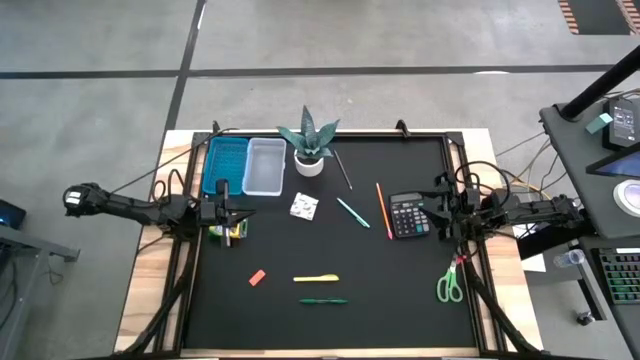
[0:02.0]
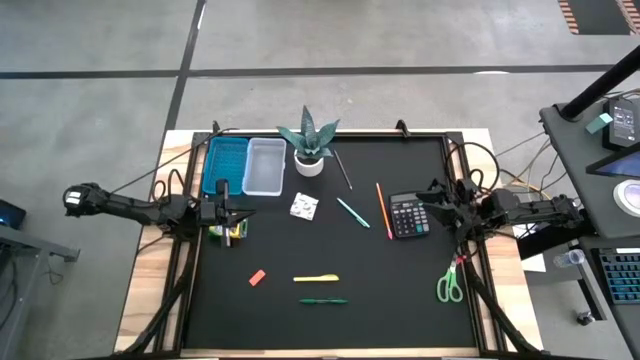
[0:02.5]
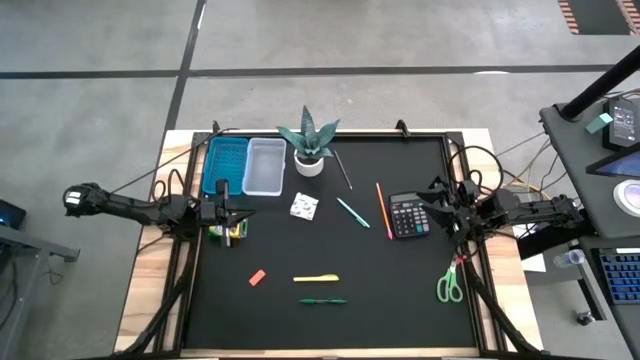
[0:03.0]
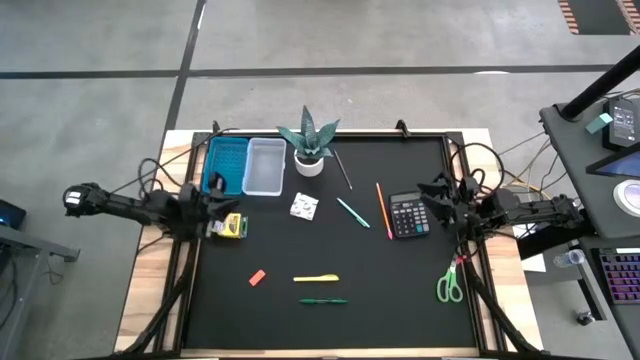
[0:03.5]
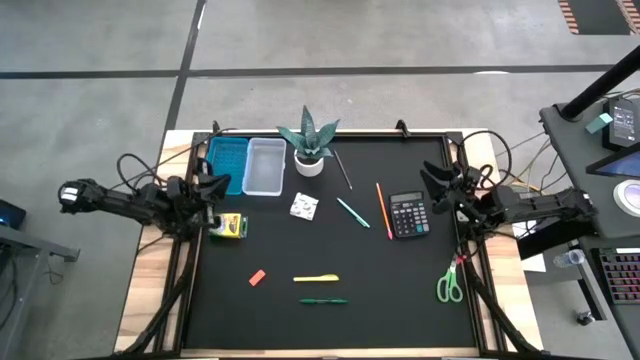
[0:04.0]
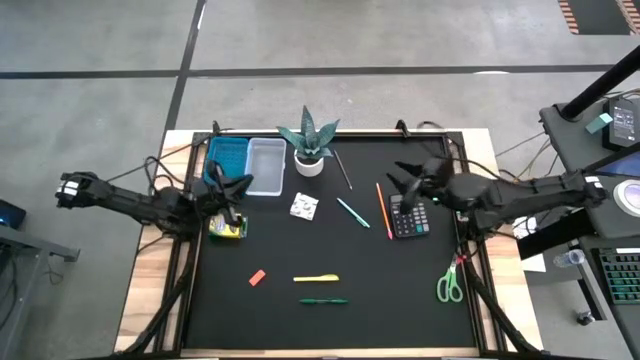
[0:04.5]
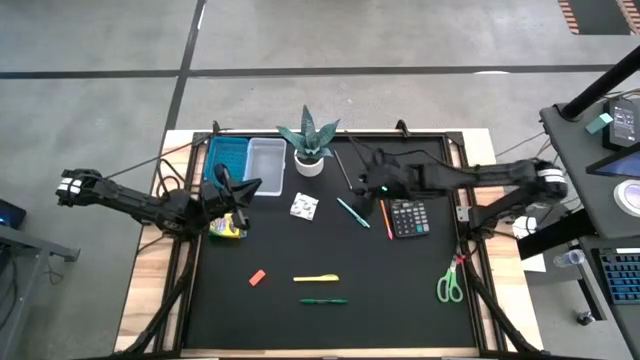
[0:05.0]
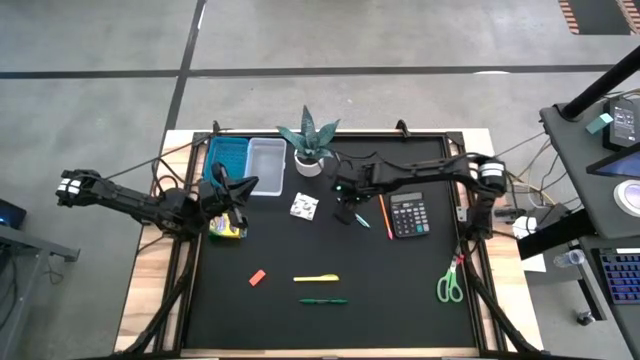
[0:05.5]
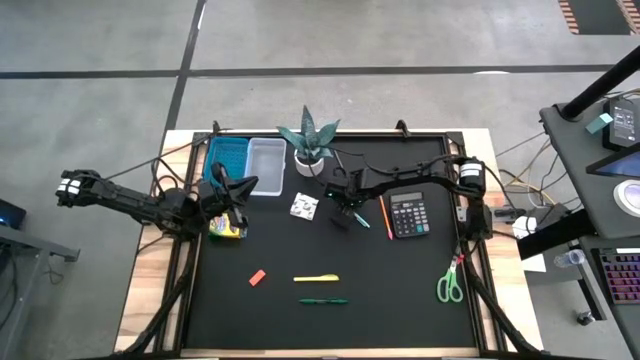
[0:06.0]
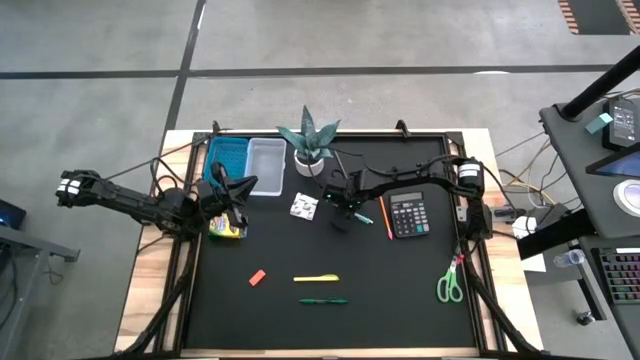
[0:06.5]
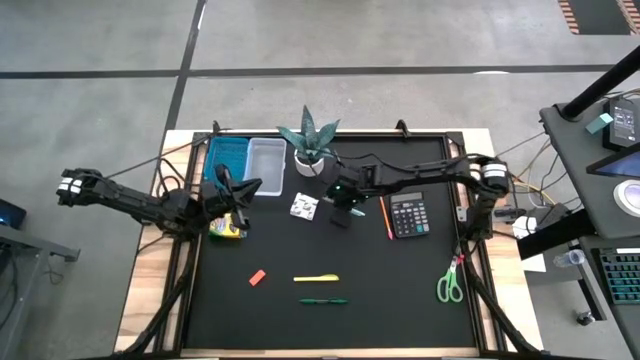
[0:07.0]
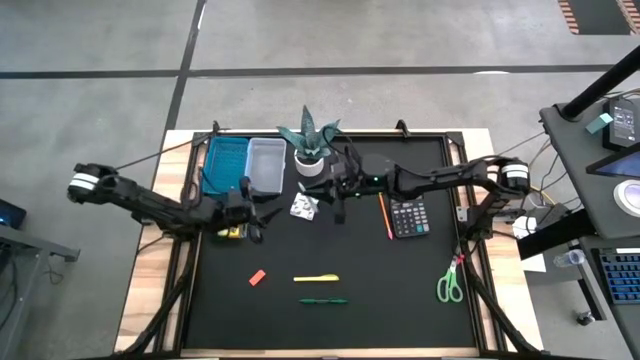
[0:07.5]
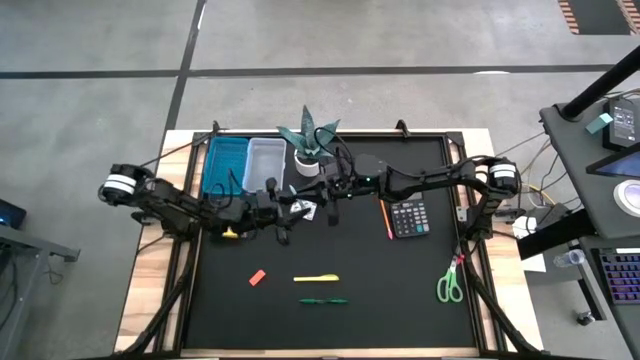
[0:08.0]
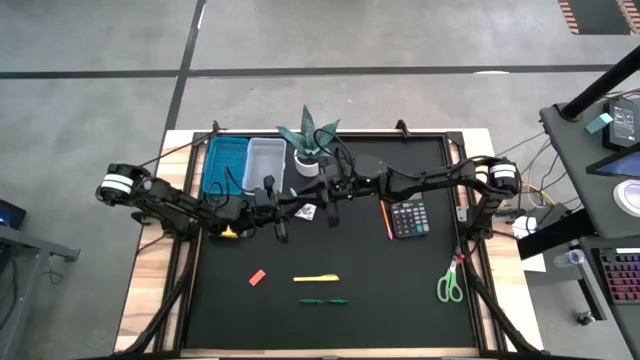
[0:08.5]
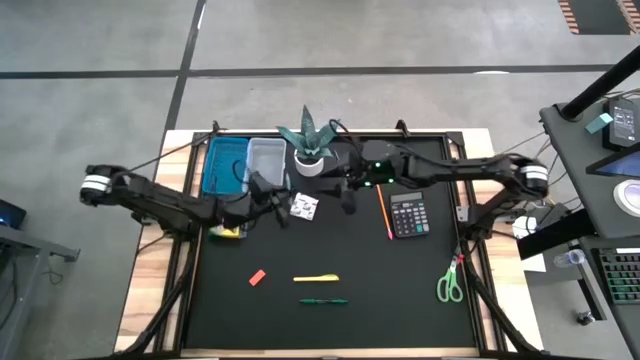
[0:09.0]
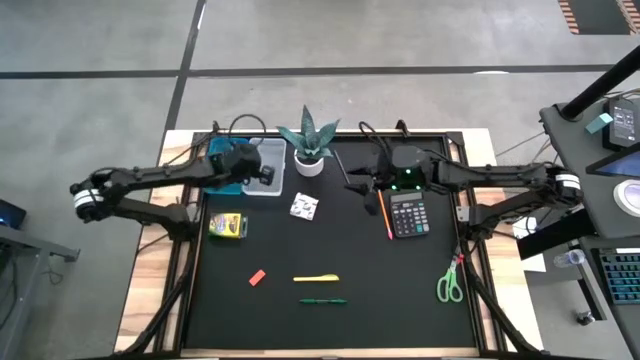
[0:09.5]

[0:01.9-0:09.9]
Task: Pack school essentials
Put the light blue pen into the blue supply box

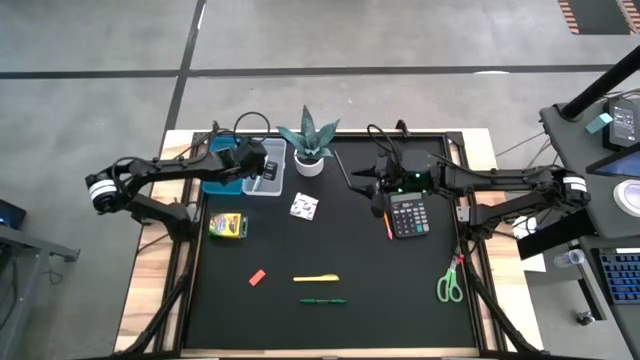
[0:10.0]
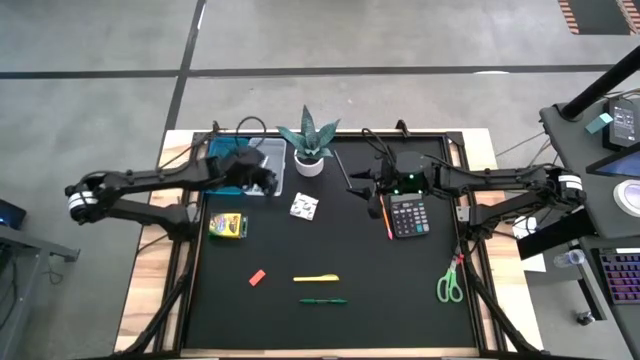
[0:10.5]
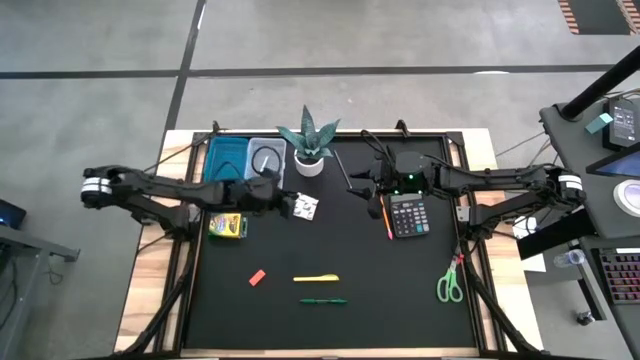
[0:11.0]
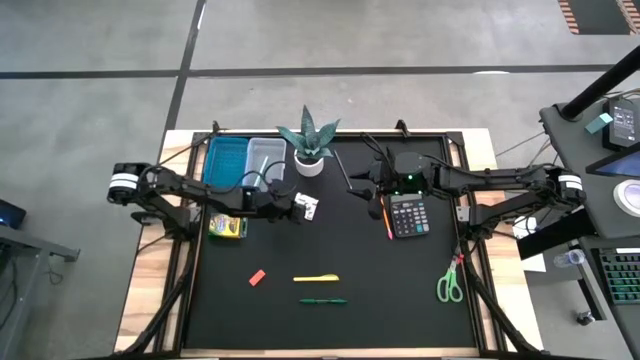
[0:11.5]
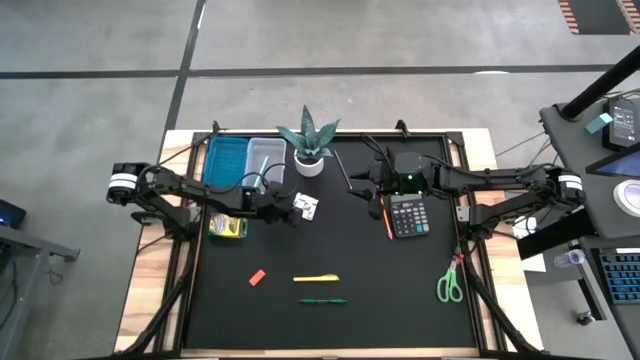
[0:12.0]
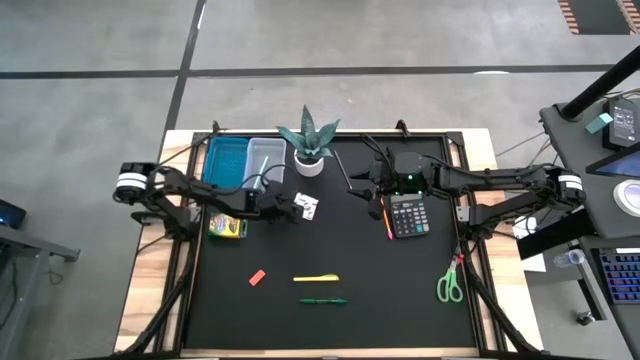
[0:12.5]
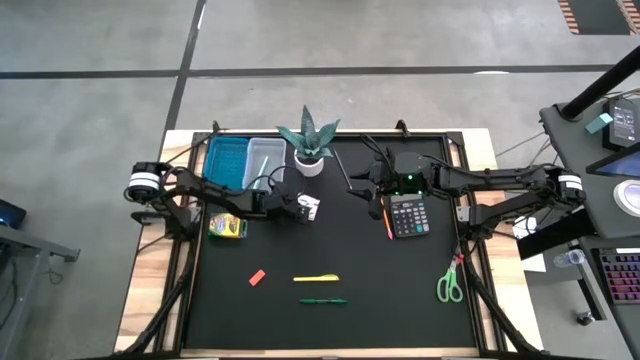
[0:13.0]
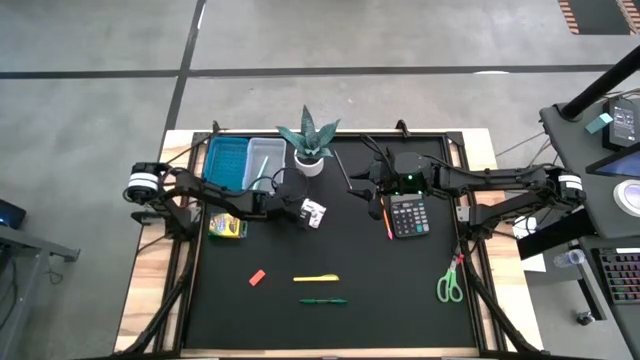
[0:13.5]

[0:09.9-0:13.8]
Put the purple sticky note into the blue supply box

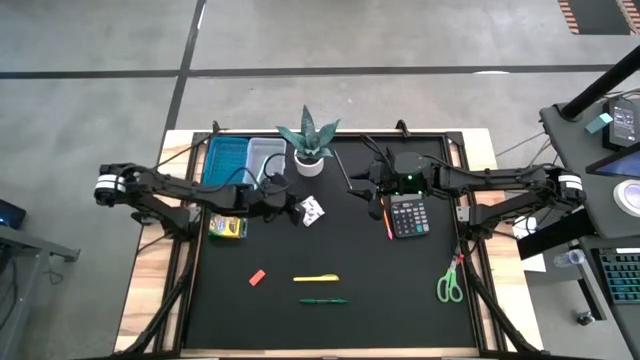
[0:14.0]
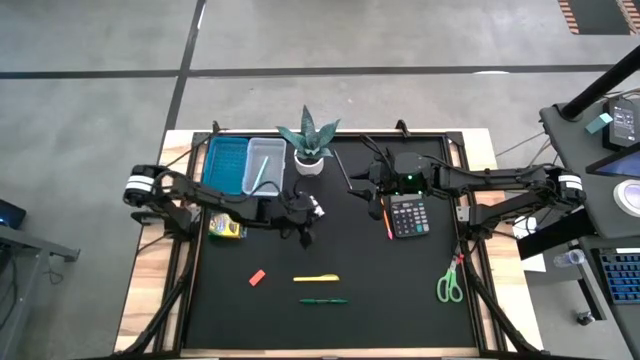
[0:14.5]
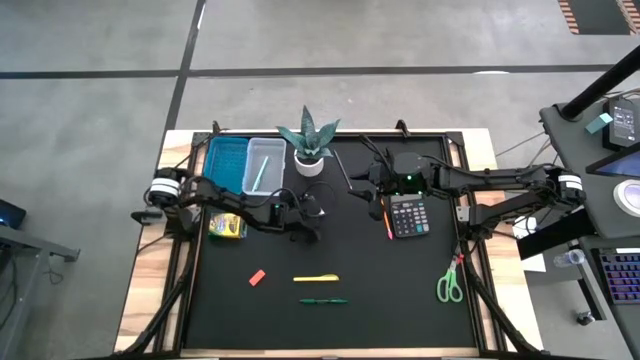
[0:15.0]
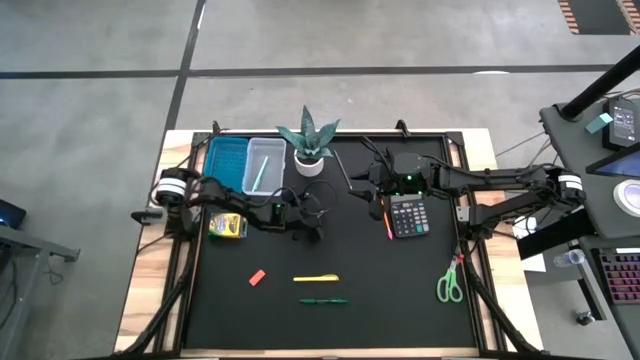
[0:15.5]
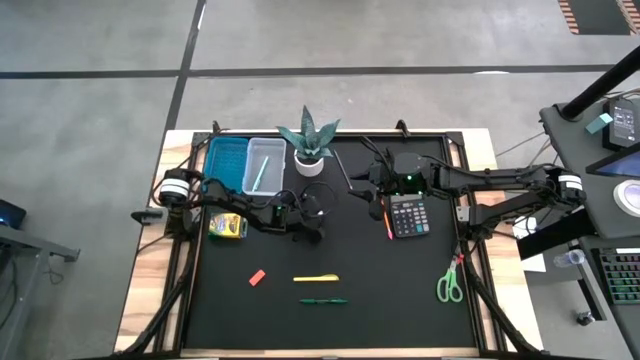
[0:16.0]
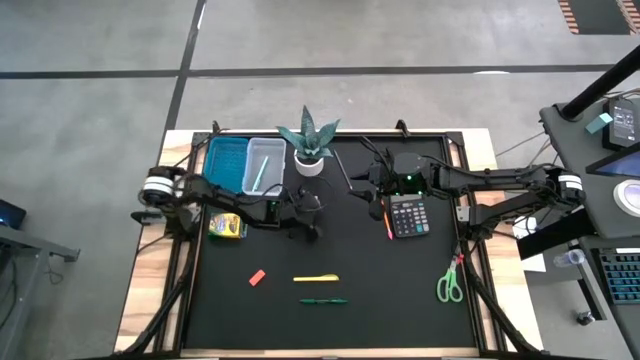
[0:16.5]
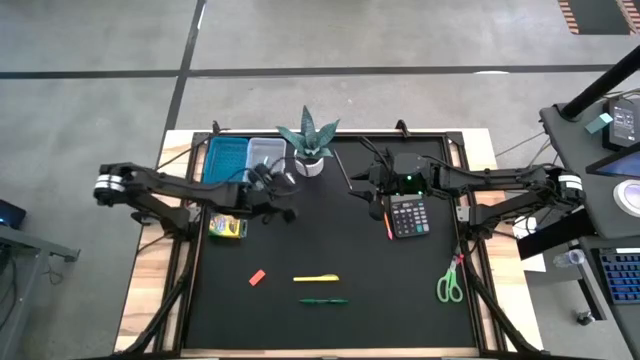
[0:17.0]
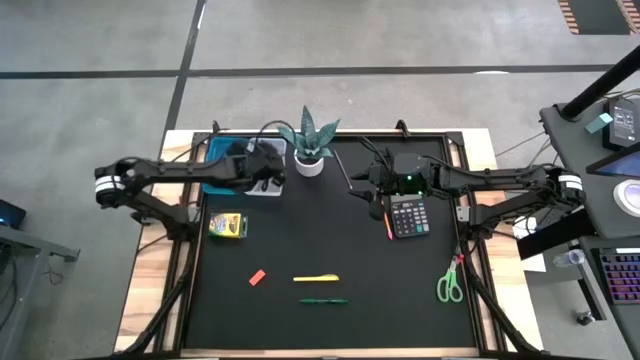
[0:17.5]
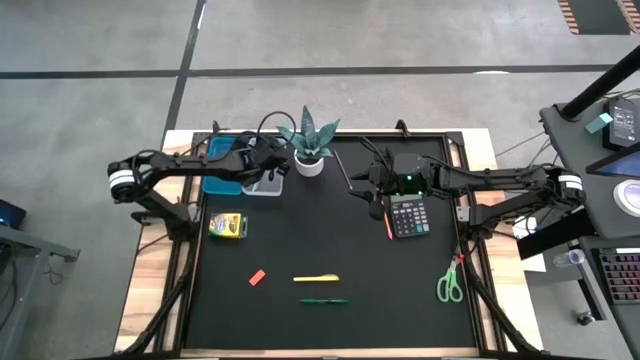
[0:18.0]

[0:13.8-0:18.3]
Put the purple sticky note into the blue supply box

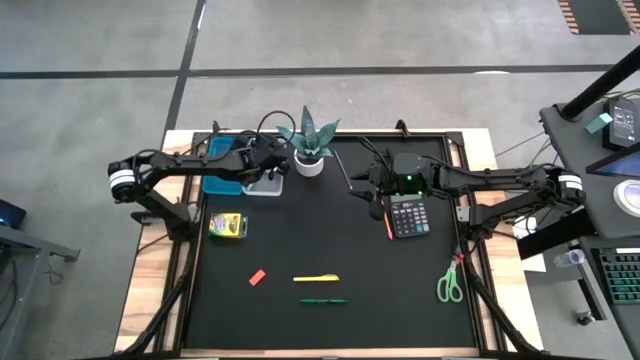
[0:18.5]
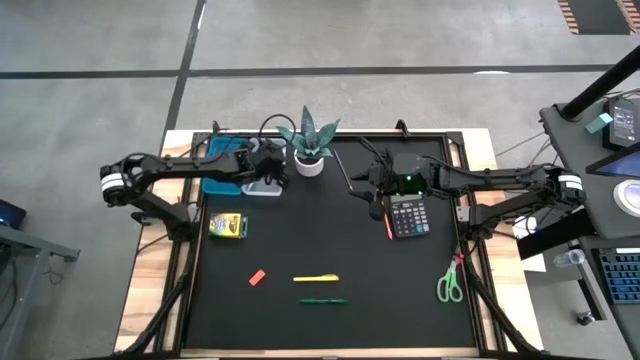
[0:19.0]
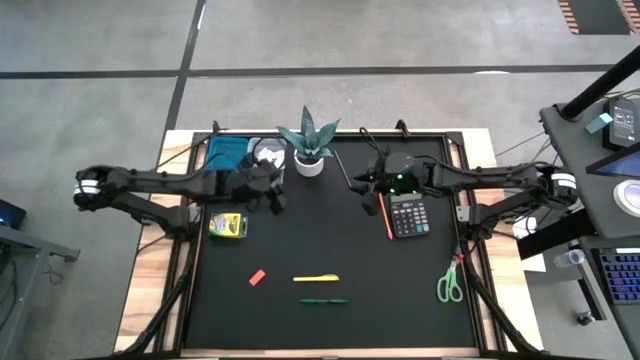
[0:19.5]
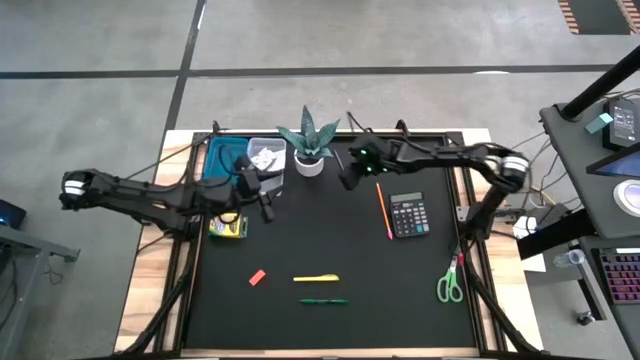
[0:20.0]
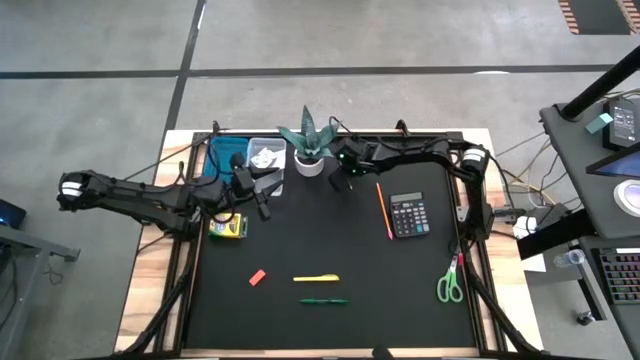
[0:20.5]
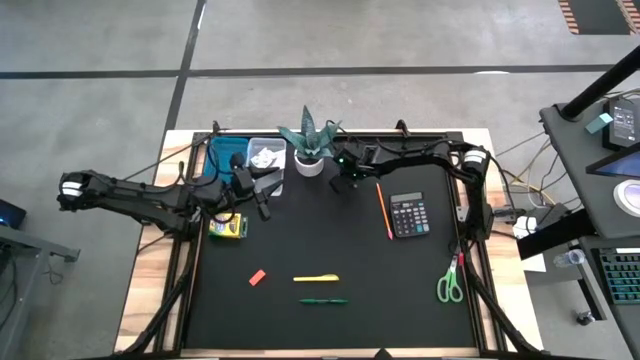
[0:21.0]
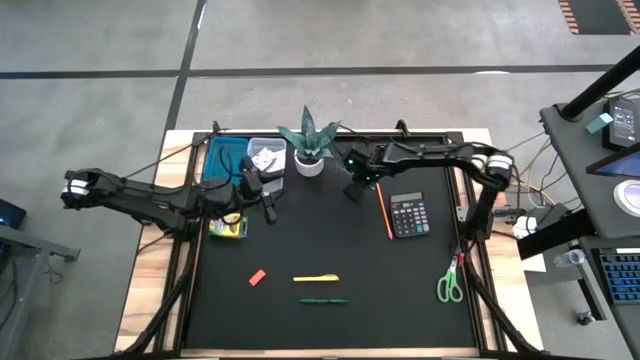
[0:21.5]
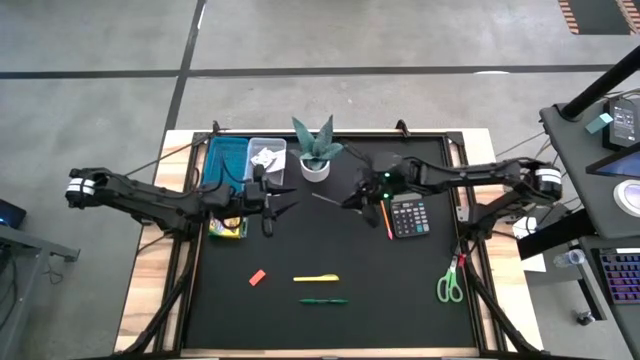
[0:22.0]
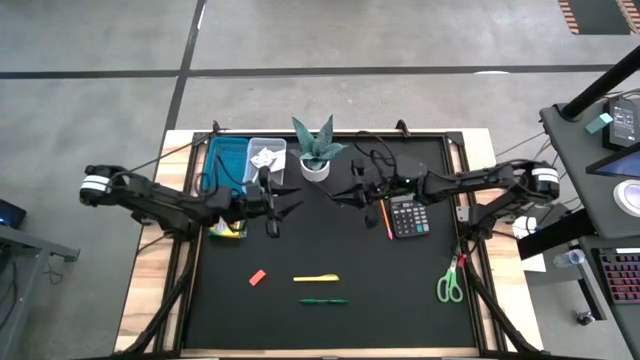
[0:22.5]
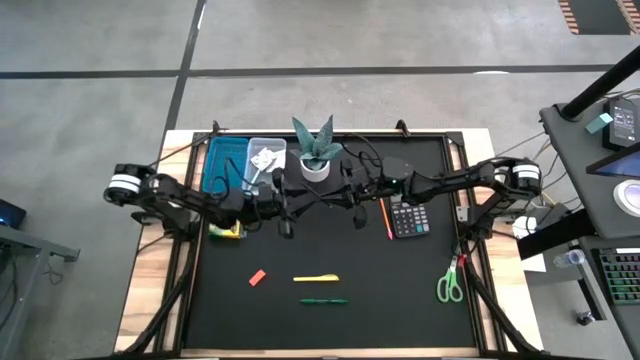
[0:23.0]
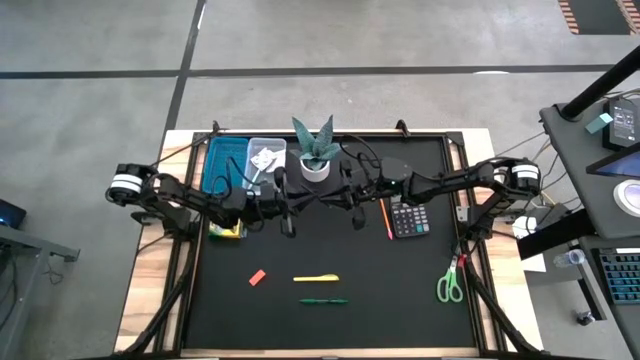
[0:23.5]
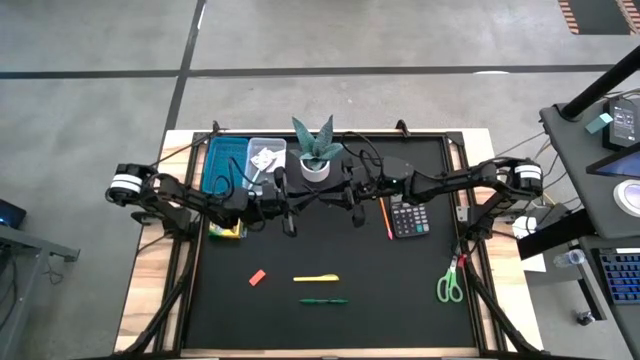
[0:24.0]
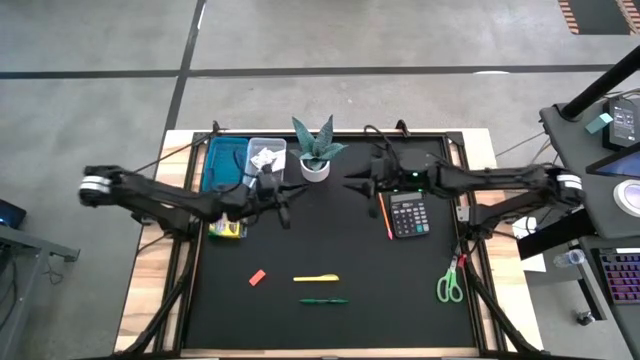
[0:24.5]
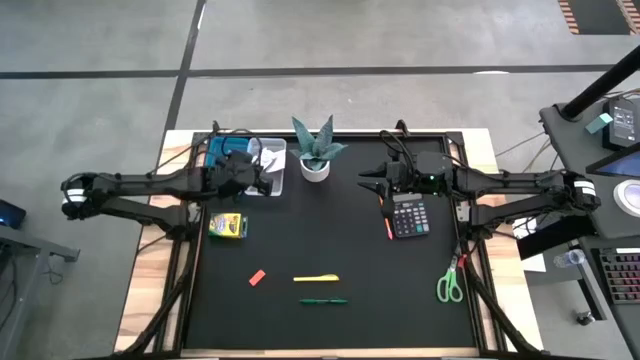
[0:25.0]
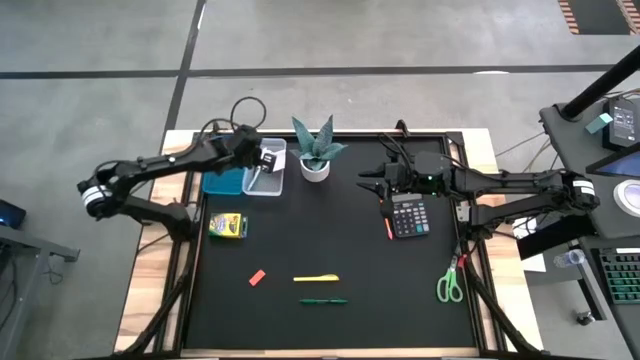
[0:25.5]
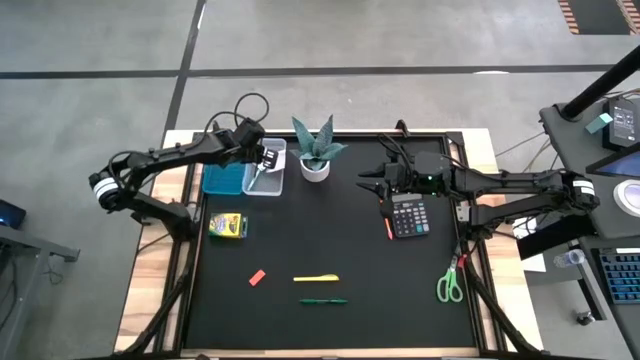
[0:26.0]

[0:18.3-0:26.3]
Put the dark blue pencil into the blue supply box
